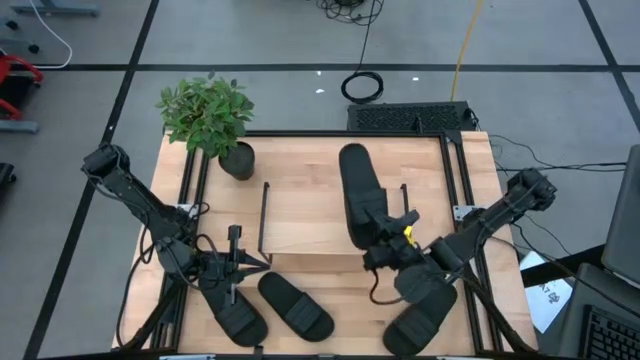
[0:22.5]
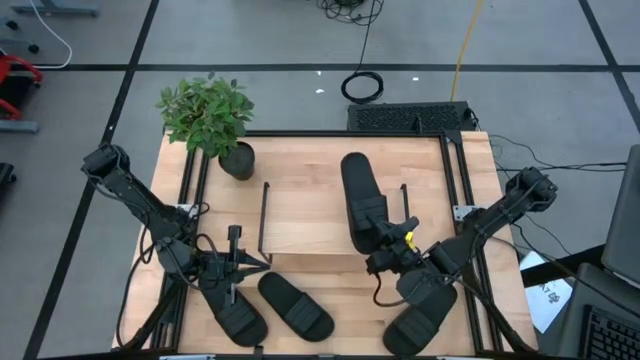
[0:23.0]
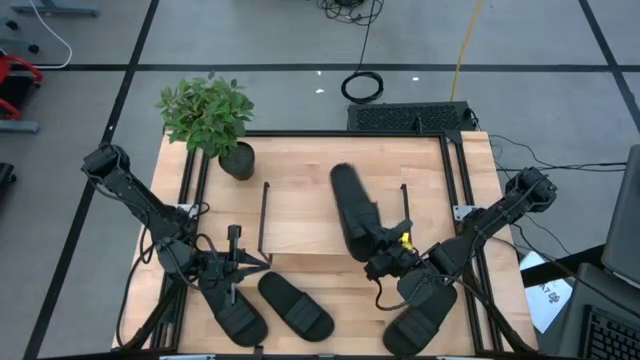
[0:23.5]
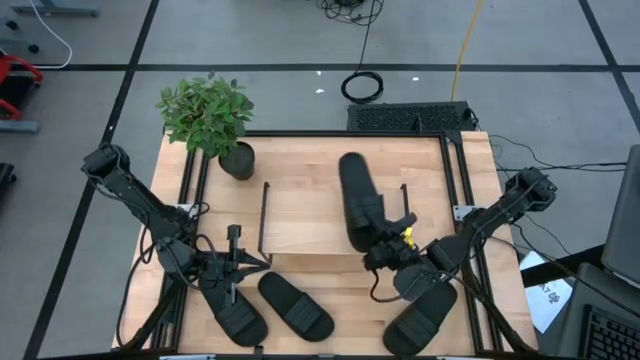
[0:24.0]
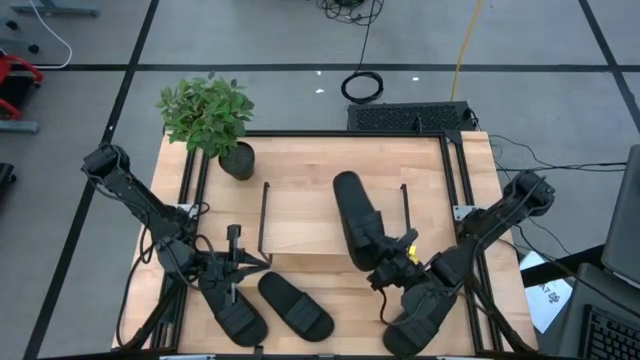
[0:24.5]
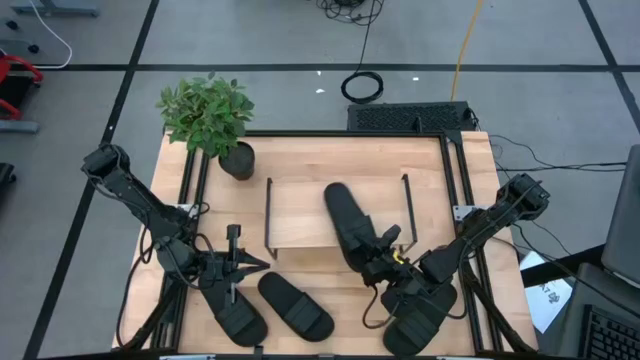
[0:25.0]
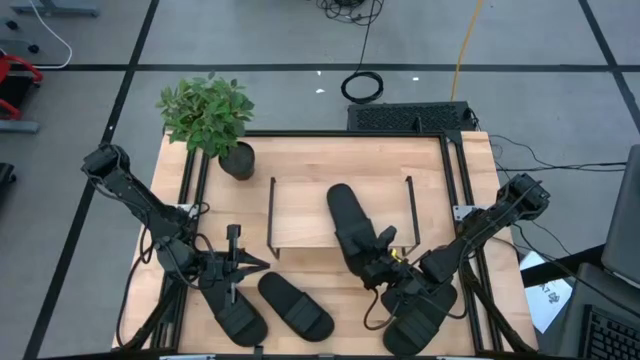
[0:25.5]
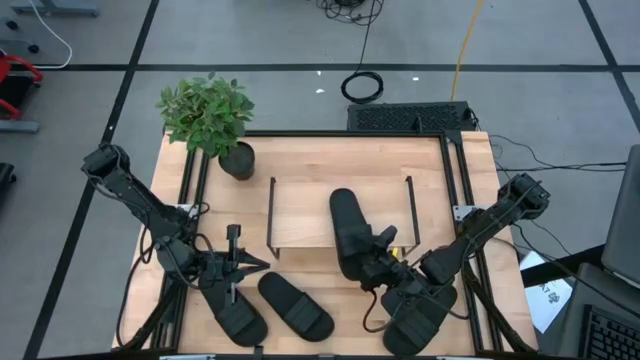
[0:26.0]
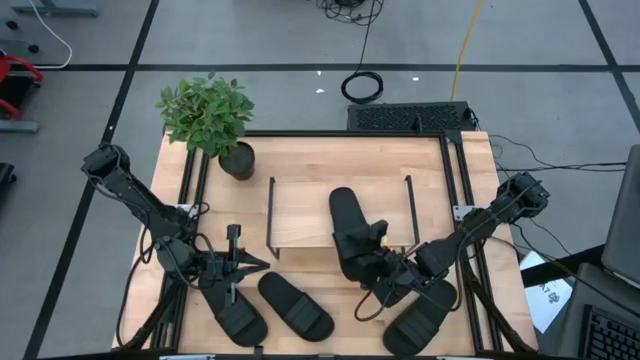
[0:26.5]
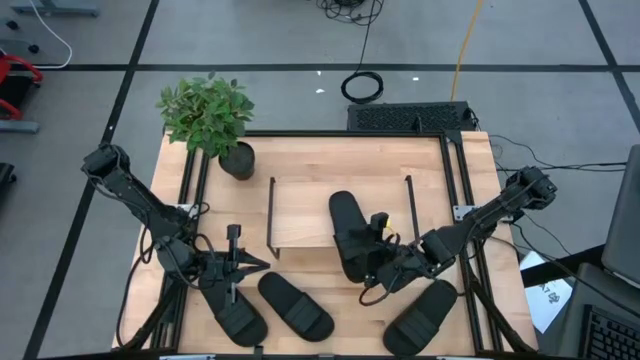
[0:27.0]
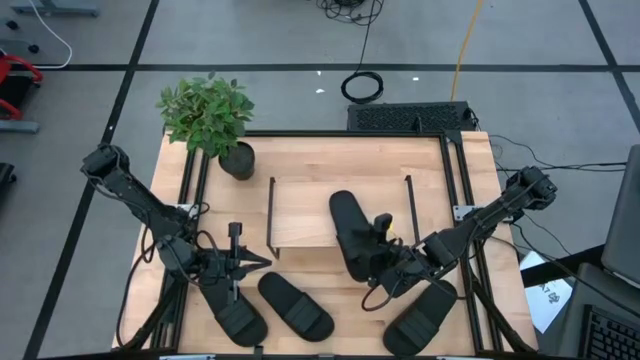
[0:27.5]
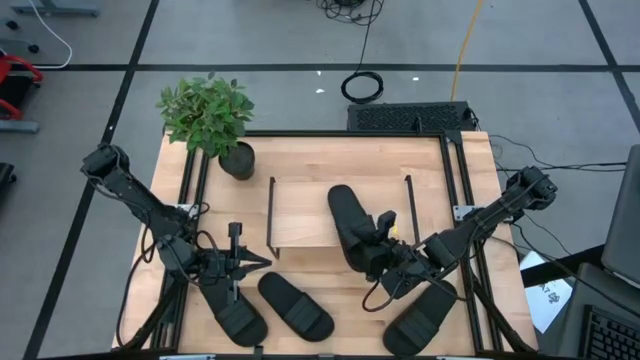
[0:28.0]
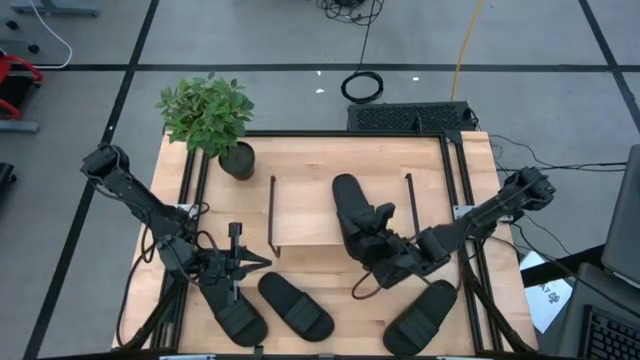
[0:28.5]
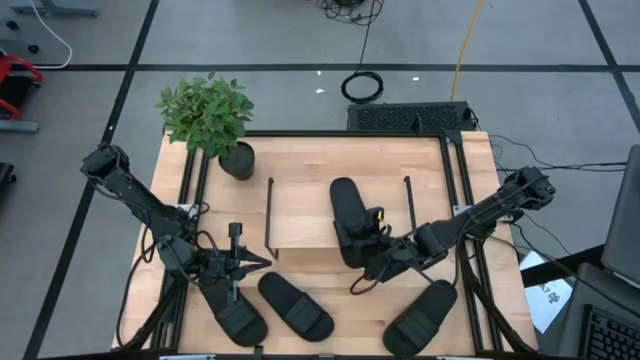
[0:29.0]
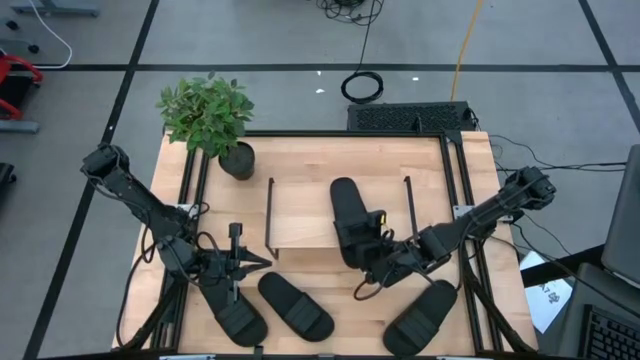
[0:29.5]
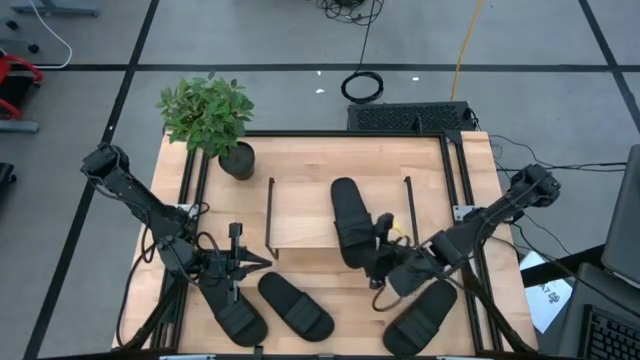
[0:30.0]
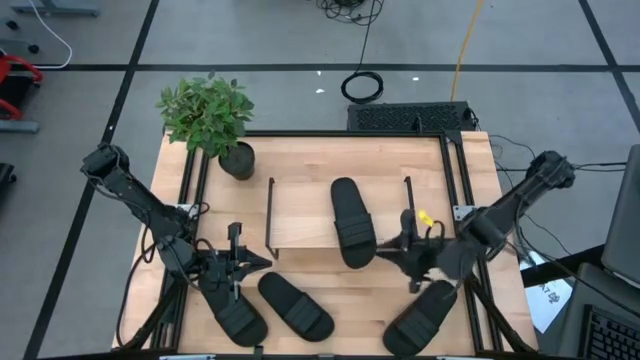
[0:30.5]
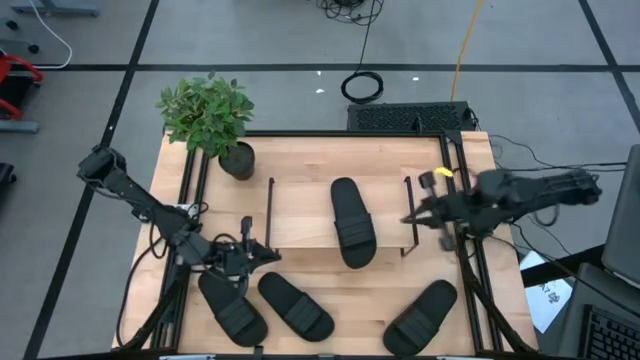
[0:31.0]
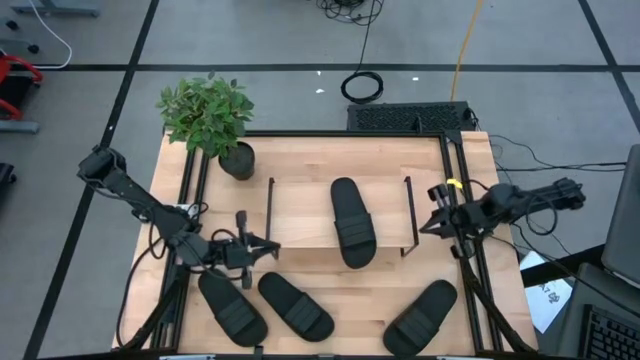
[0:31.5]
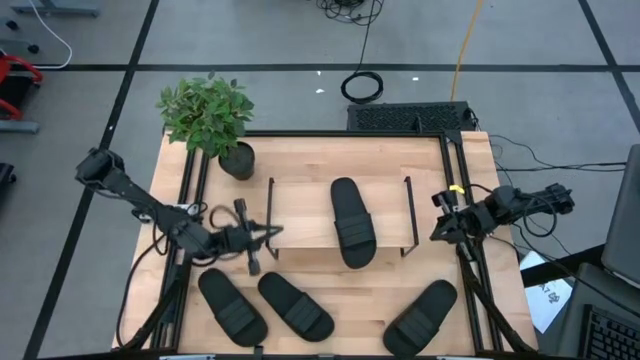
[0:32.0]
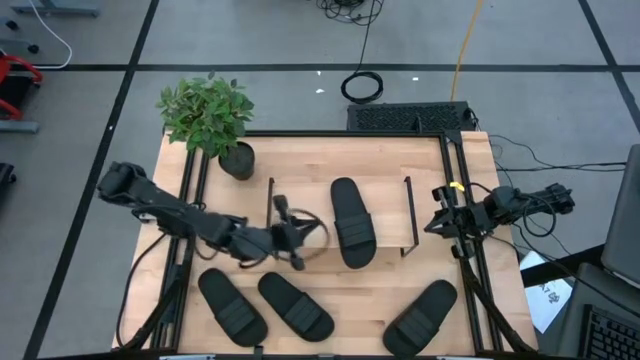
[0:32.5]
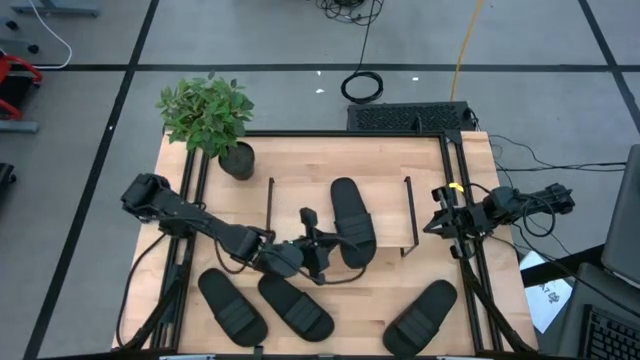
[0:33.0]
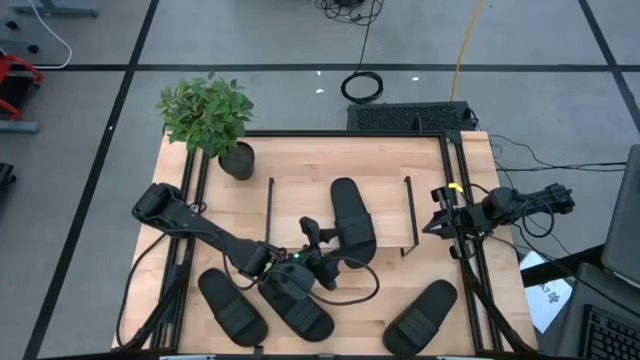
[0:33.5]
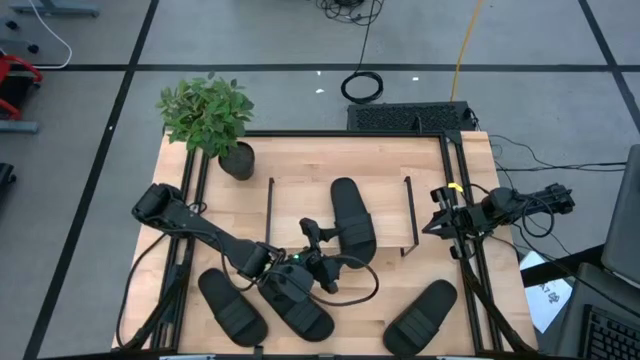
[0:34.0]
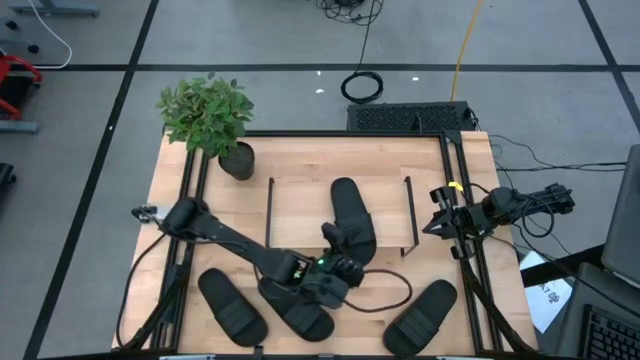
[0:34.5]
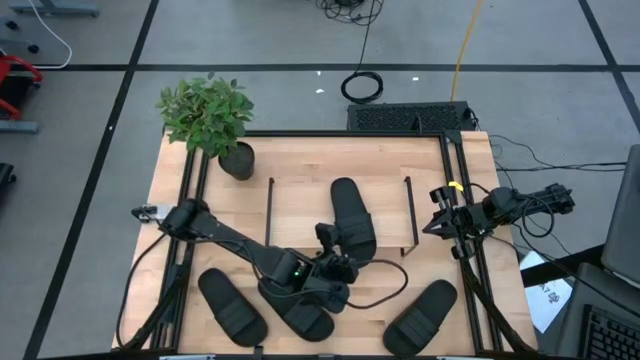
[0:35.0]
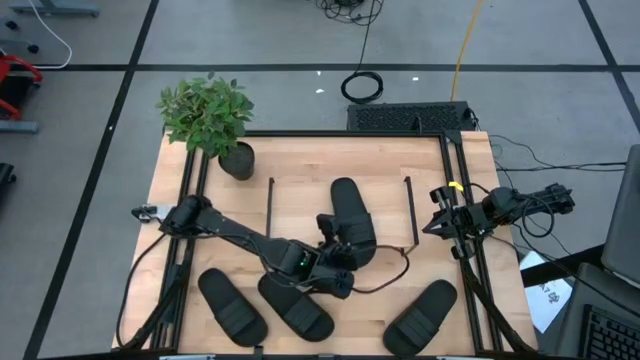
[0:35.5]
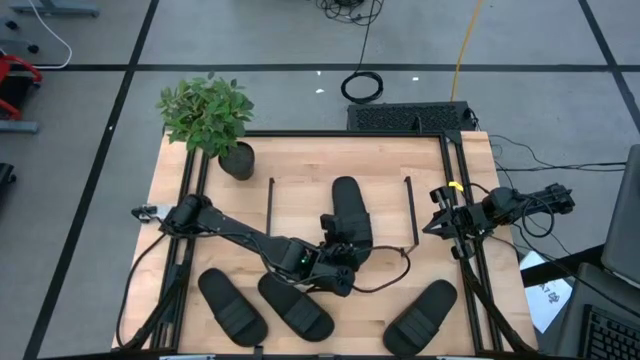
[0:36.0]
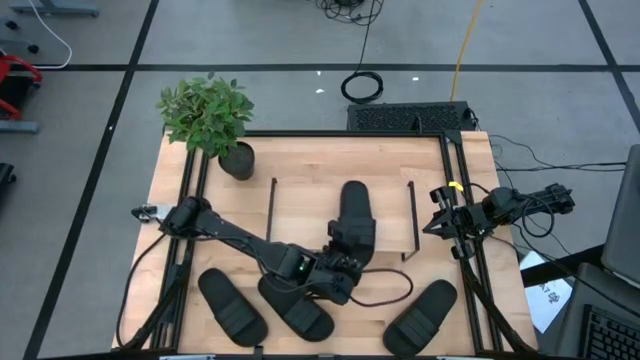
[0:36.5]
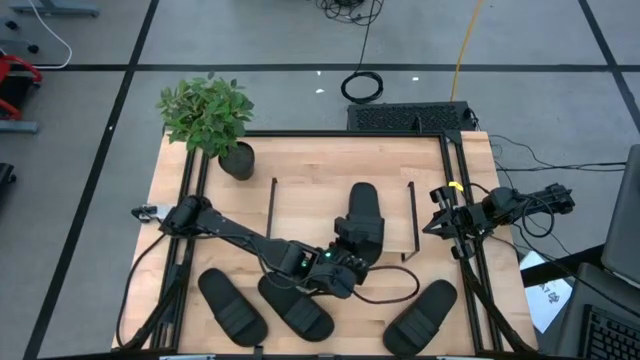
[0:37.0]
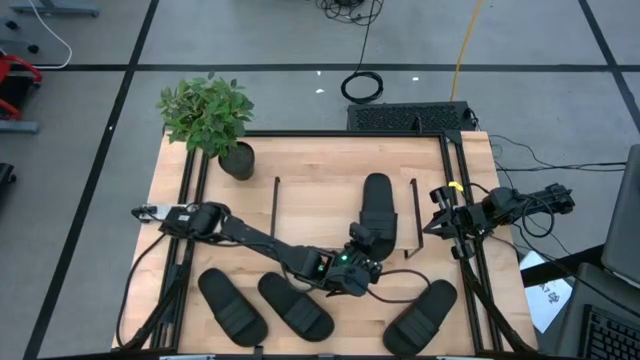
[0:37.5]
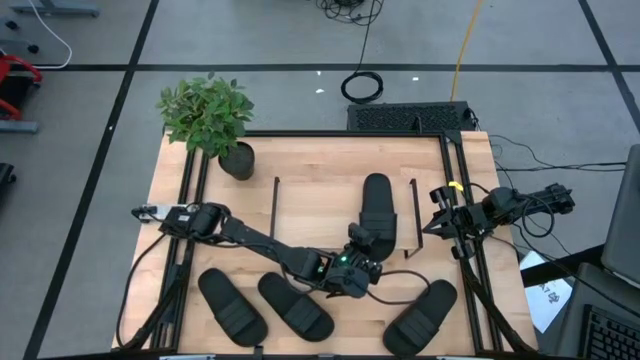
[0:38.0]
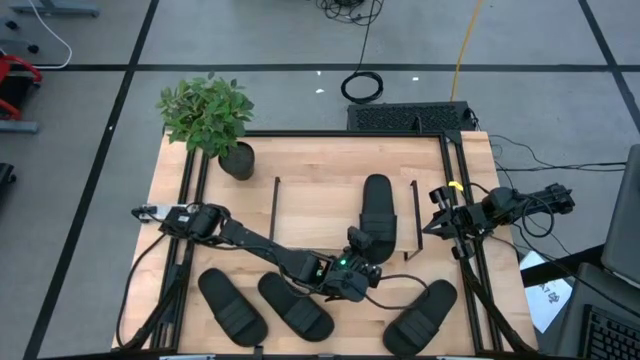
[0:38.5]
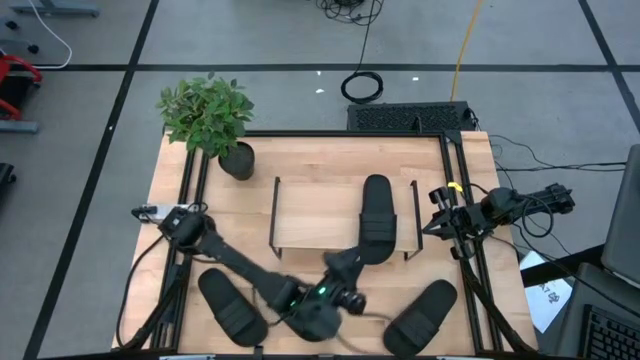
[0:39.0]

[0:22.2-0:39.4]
Task: Pick and place slides into the shelf
Put the black slide on the shelf

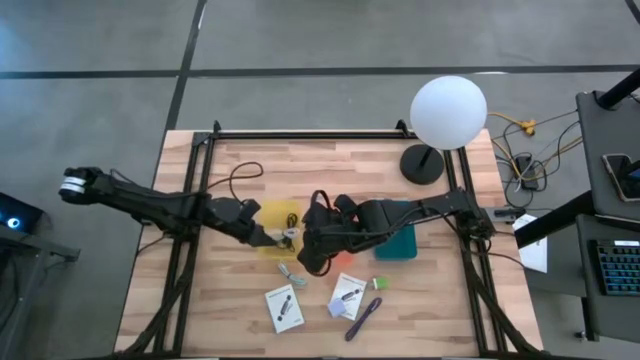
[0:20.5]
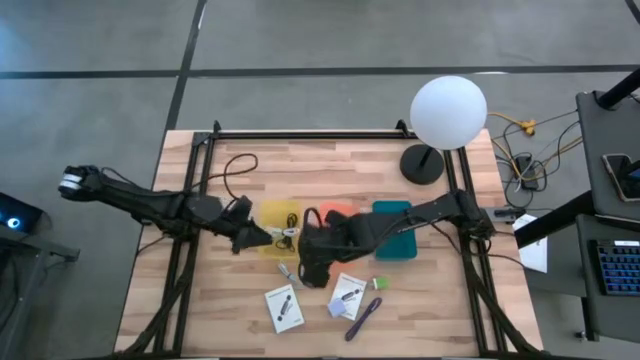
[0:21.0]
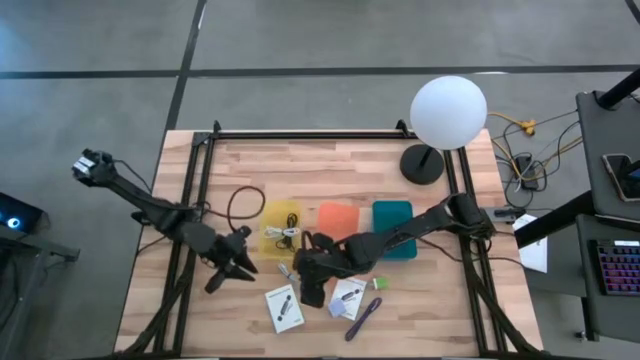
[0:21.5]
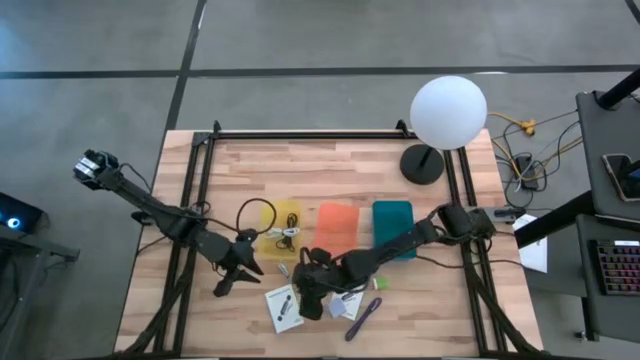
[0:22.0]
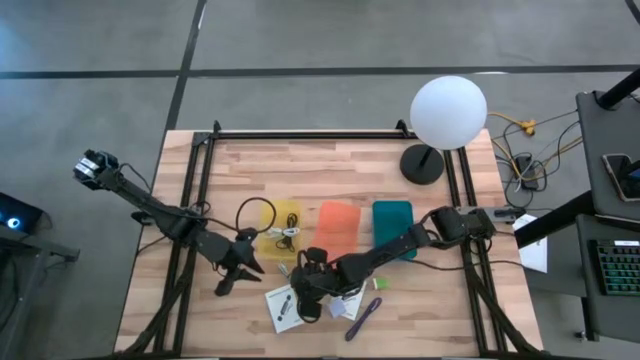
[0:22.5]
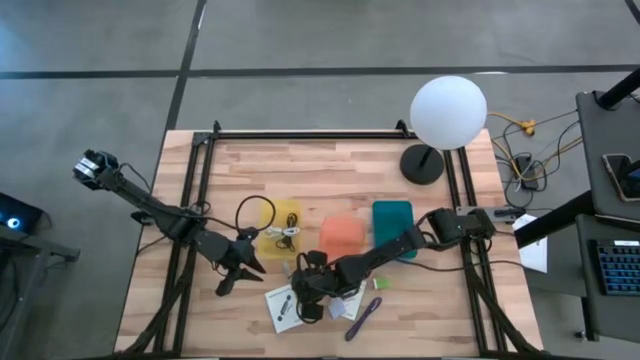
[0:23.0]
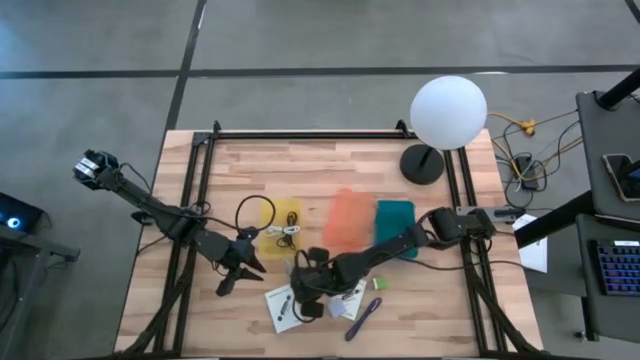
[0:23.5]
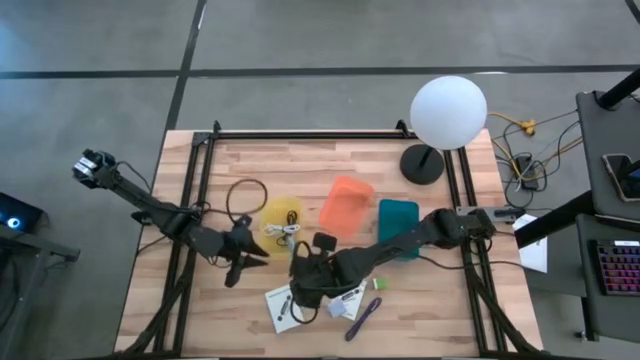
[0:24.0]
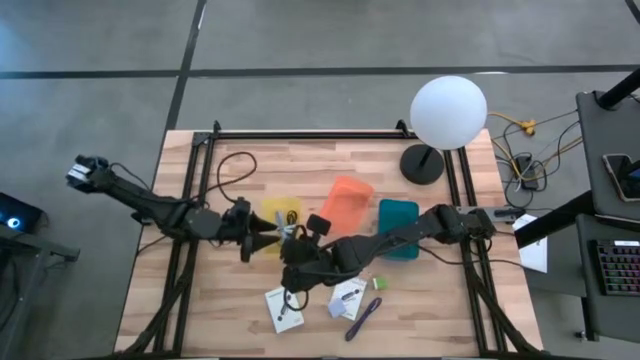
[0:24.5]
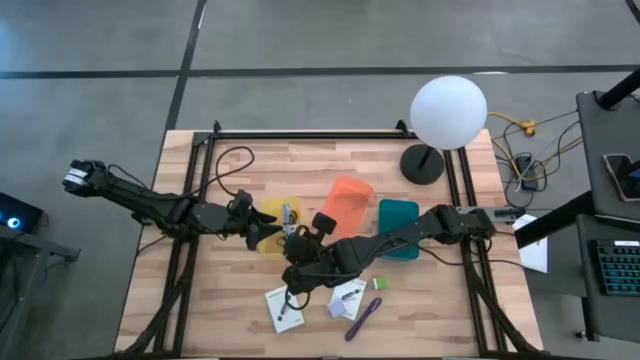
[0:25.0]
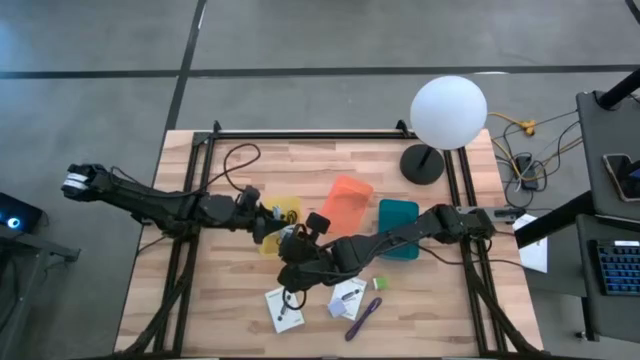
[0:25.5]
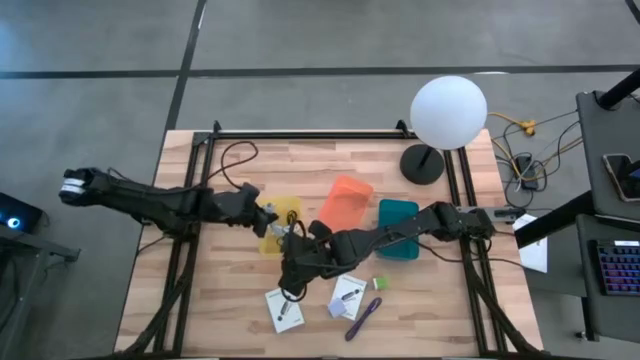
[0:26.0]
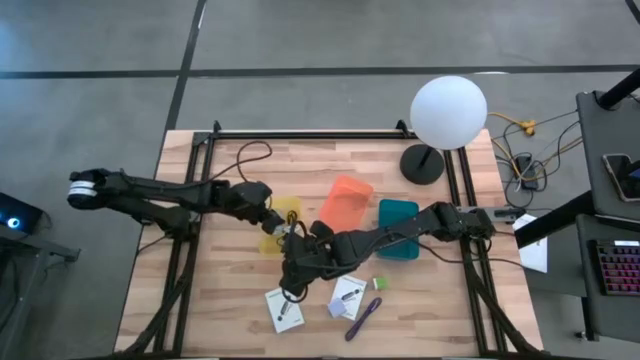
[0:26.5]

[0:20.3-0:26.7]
Task: Pick and place items into bin
Put the blue USB cable into the yellow bin
